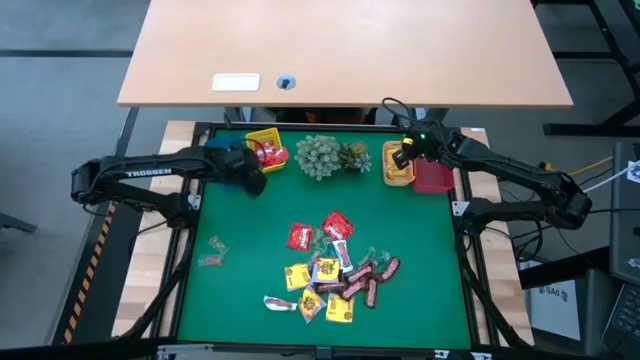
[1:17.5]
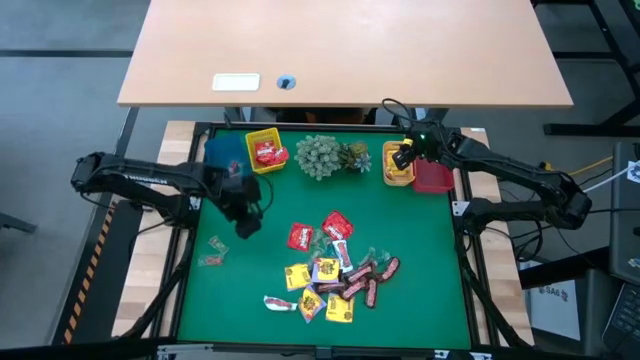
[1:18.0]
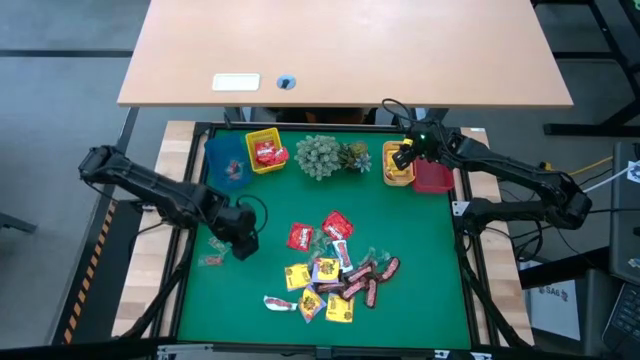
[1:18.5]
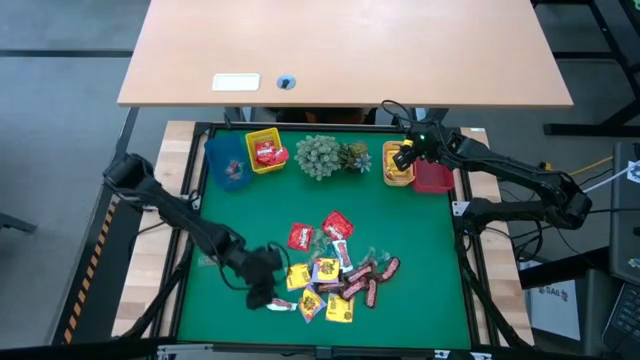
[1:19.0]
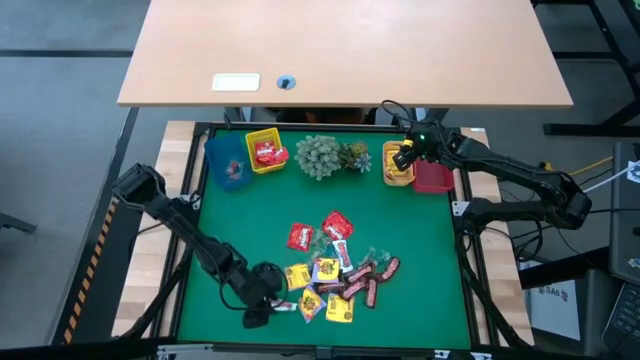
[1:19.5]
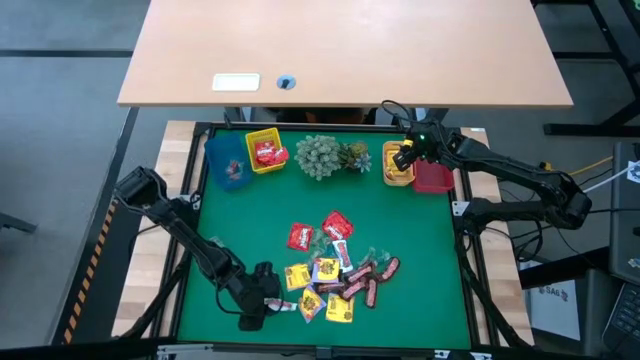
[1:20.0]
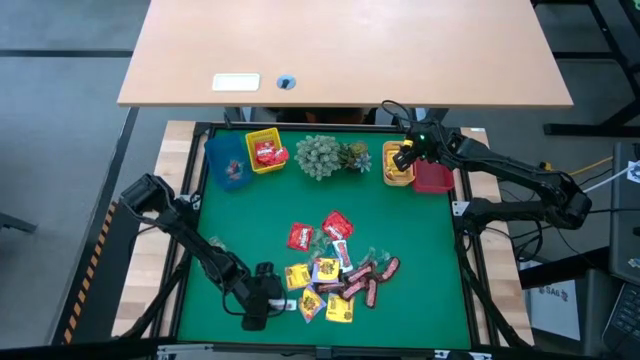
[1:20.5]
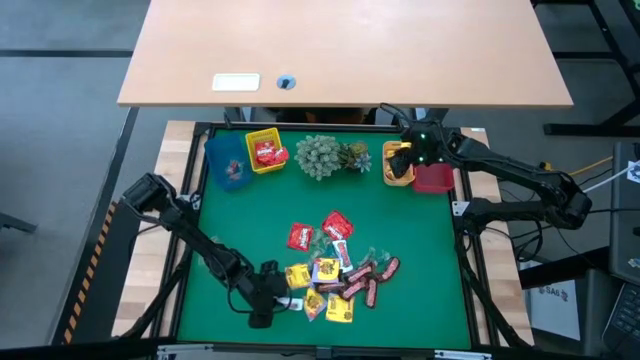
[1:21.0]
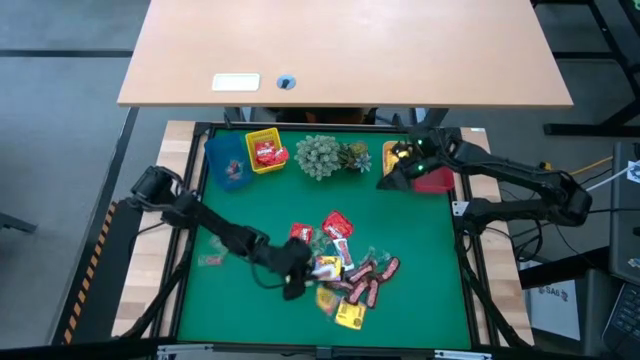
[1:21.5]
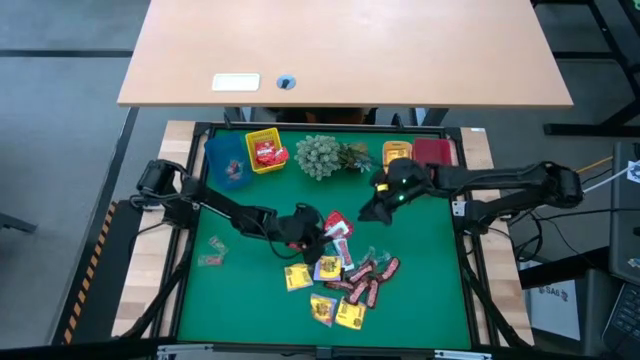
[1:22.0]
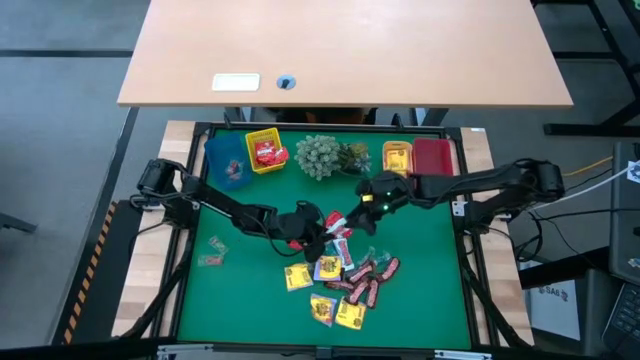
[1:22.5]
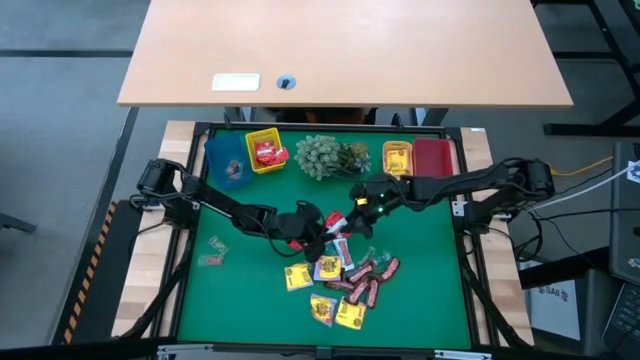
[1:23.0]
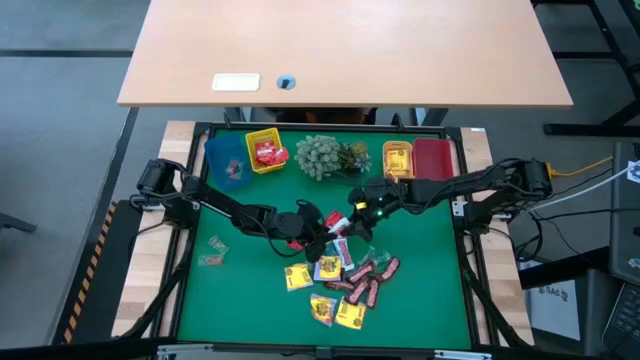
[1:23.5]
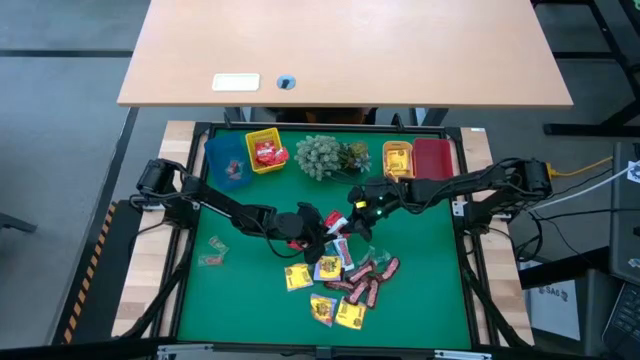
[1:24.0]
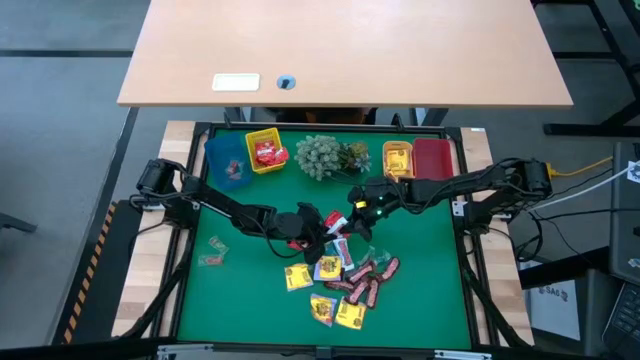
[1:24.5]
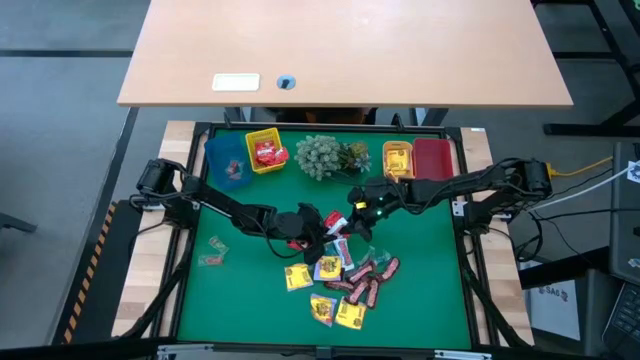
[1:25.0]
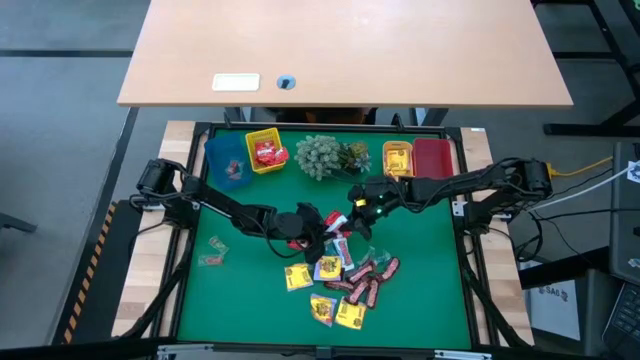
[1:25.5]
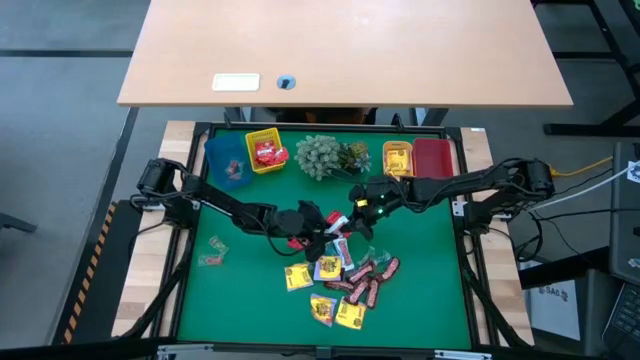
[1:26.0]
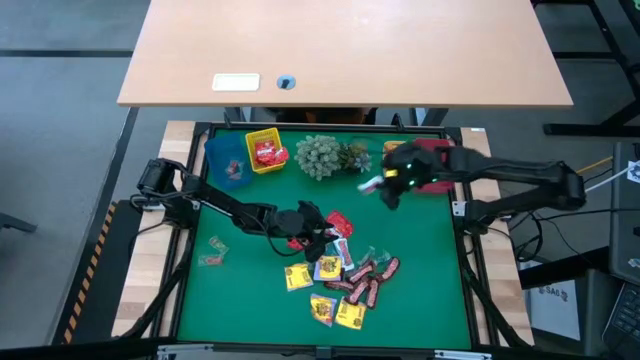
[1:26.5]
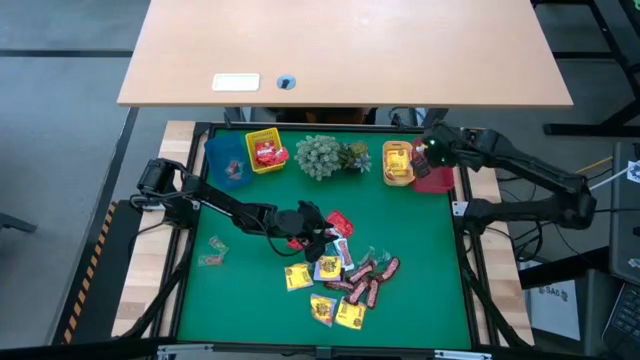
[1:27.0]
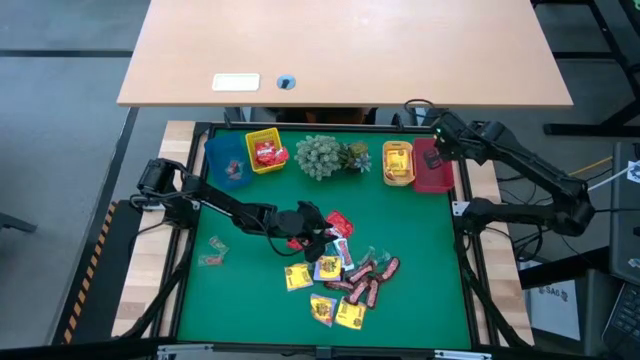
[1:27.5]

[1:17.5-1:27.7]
Task: Sort candy
Put the white chocolate into the red bin

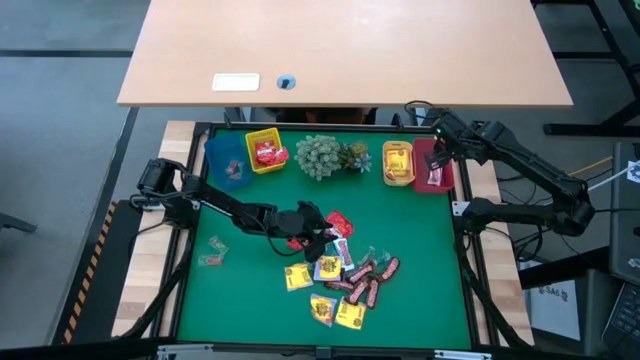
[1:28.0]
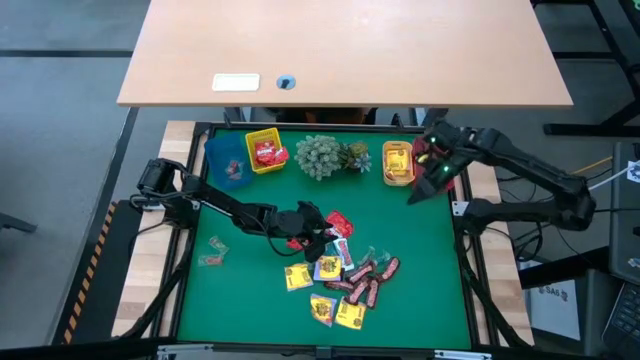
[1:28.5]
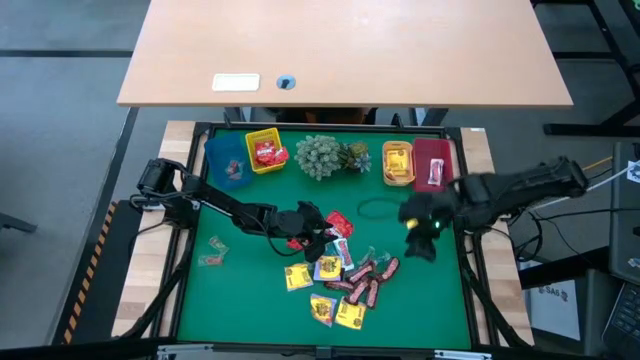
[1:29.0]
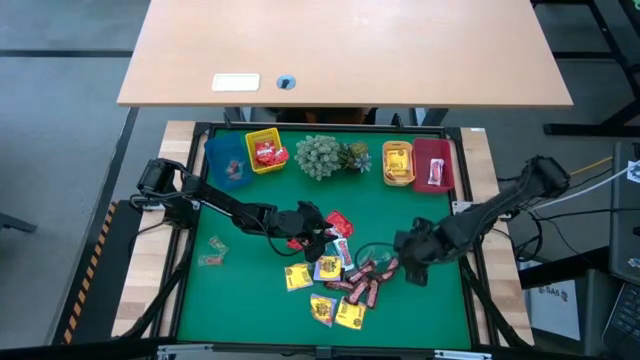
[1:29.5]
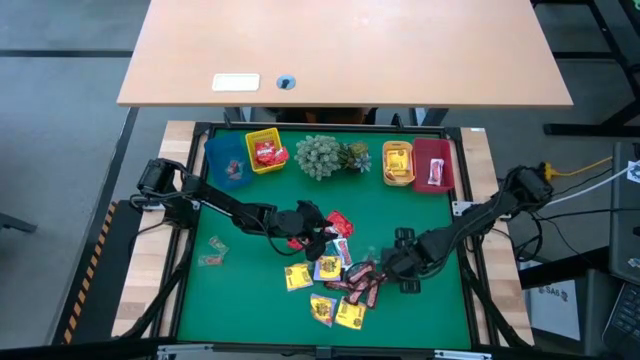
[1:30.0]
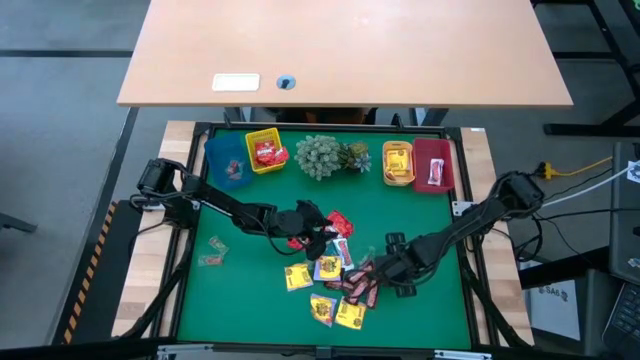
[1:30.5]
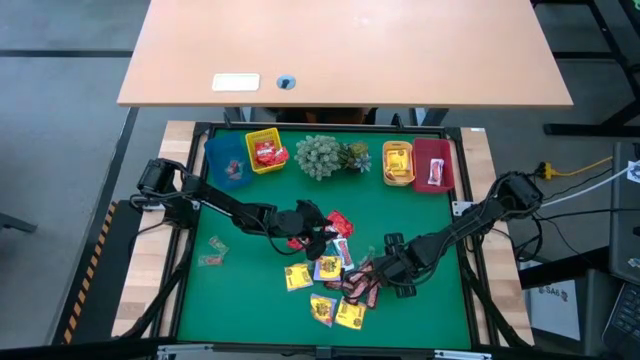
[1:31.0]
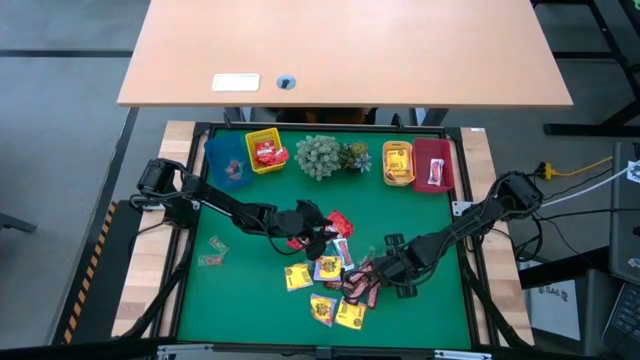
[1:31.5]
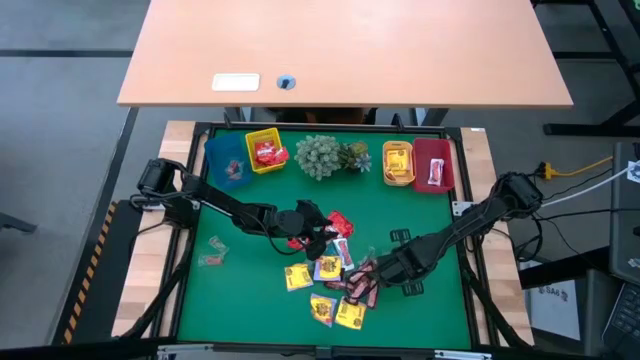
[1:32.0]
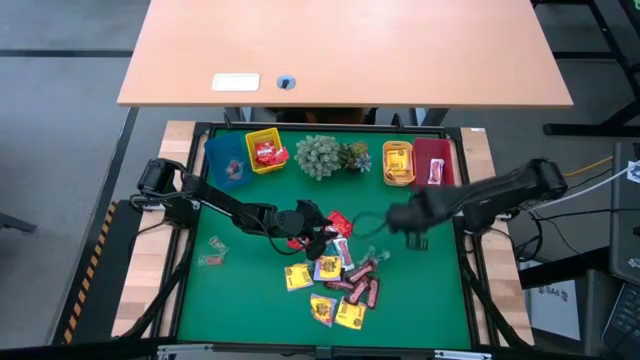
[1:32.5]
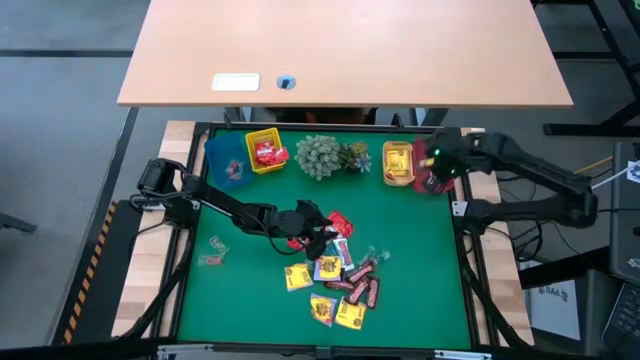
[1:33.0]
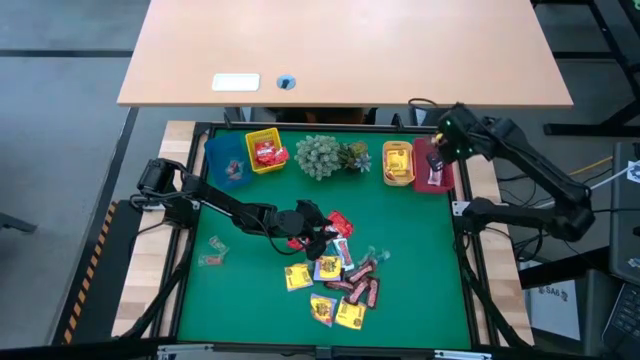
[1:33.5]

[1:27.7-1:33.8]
Put the brown chocolate into the red bin

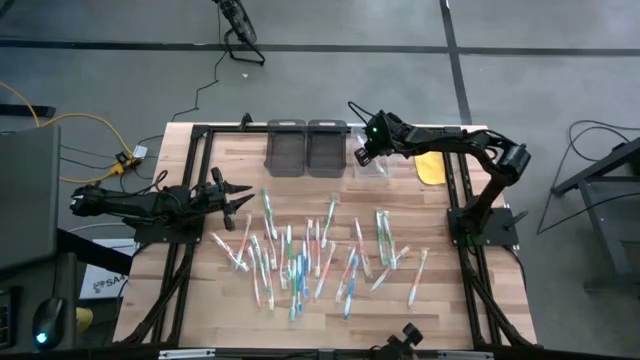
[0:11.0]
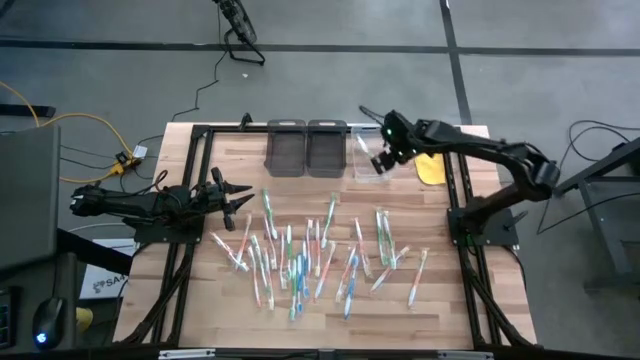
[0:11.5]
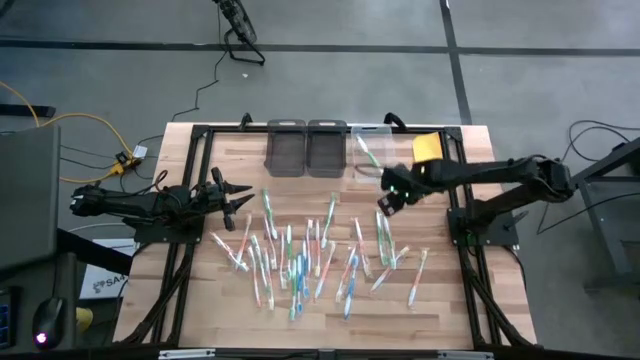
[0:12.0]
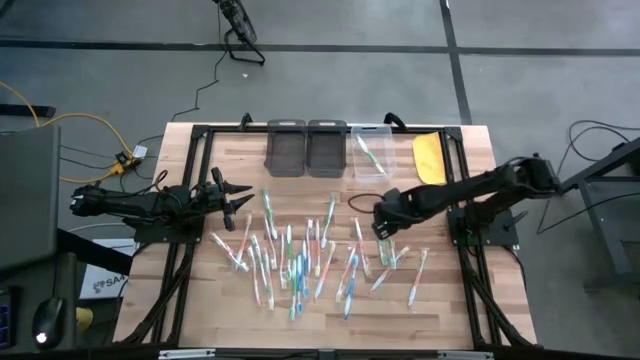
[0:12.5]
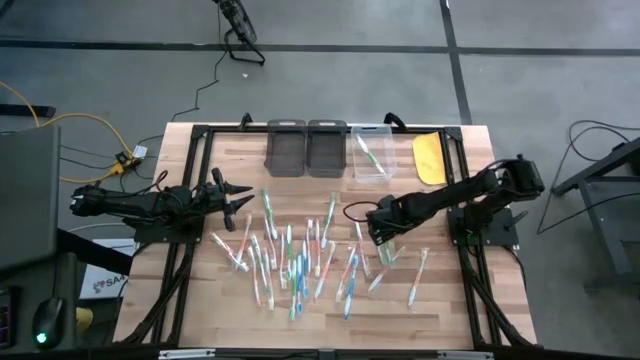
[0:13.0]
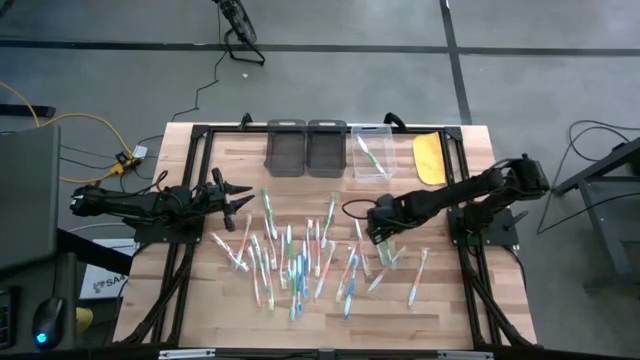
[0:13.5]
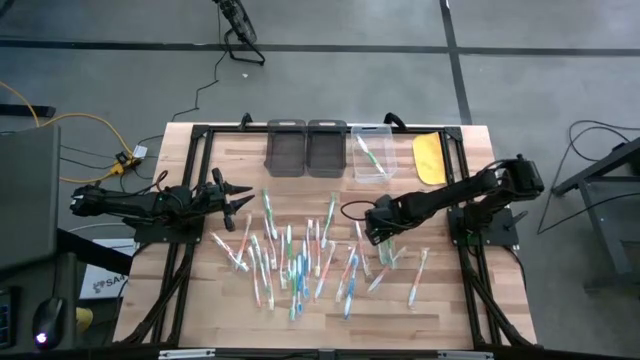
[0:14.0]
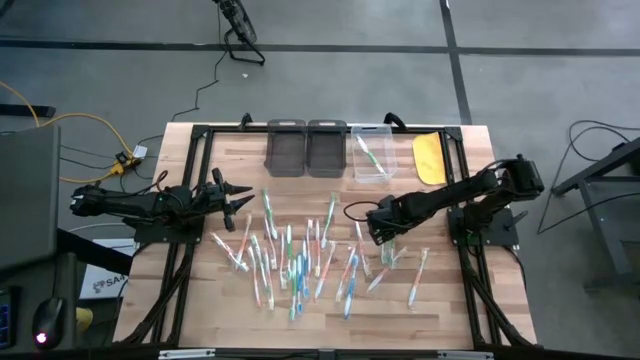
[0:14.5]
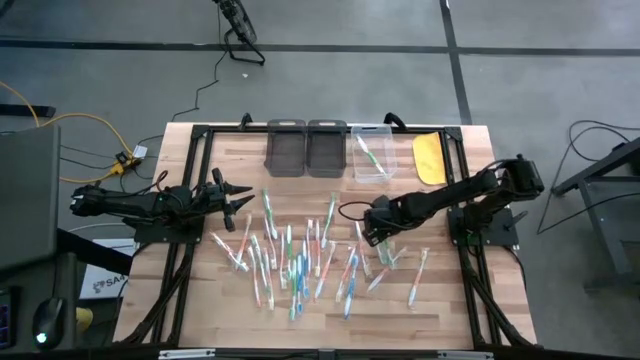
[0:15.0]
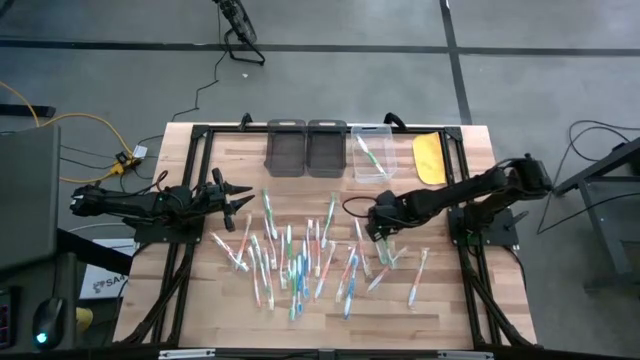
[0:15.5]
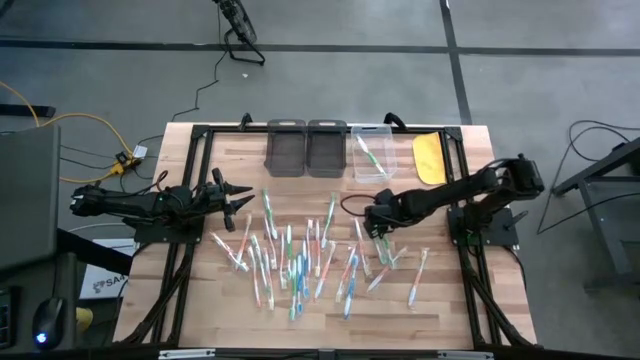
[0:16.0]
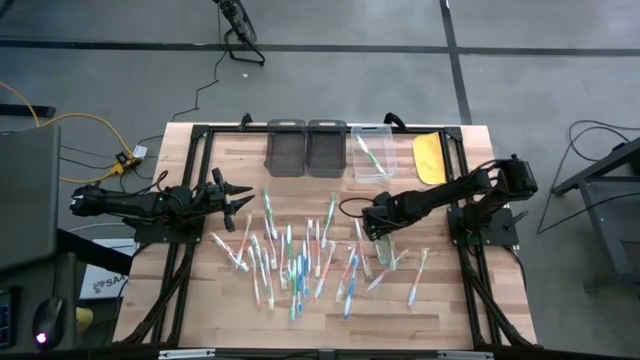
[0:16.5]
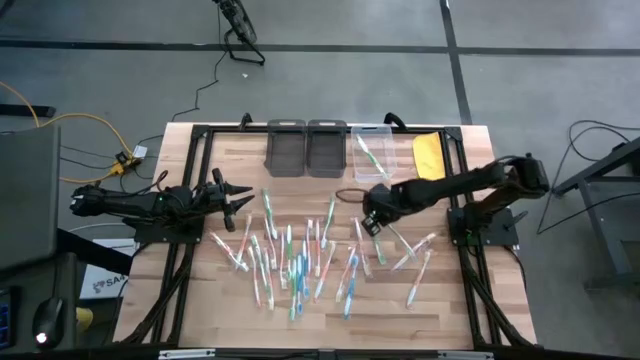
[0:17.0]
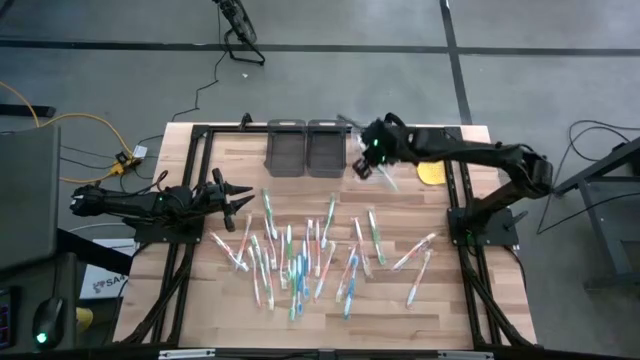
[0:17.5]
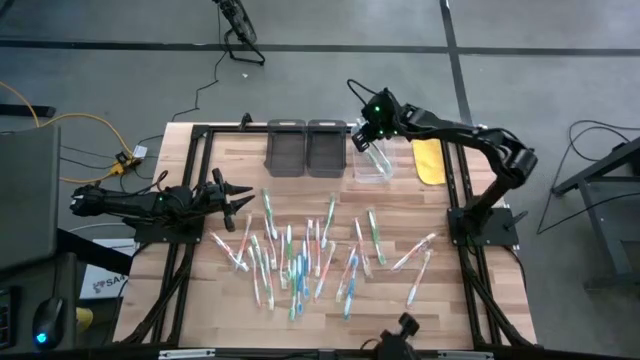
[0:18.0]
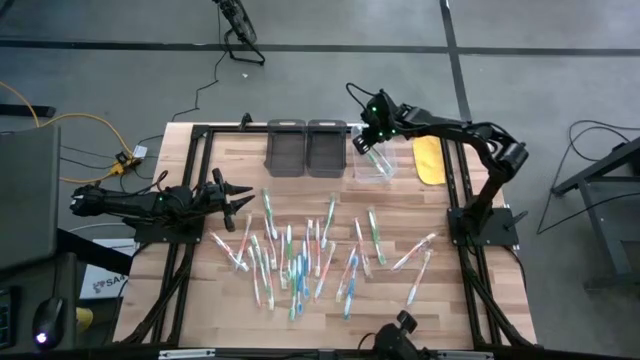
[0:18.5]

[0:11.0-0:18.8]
Task: Pick & Place Toothbrushes
Put the green toothbrush into the transparent bin
